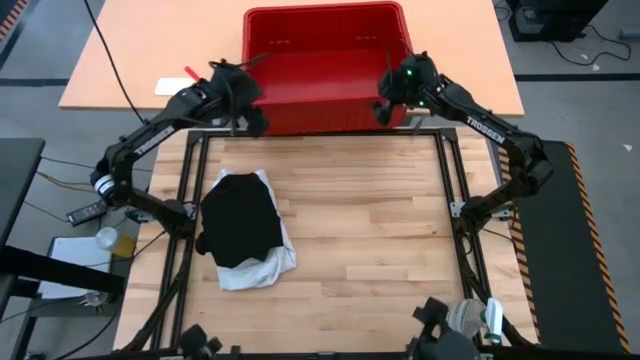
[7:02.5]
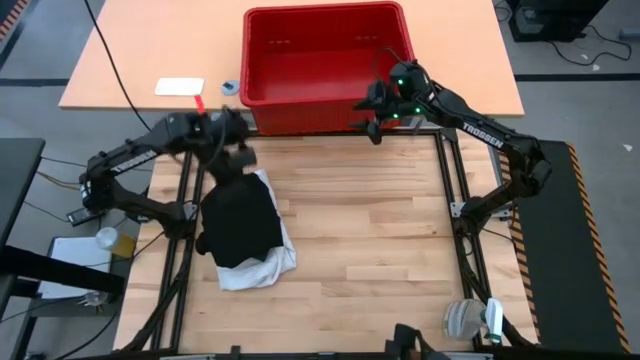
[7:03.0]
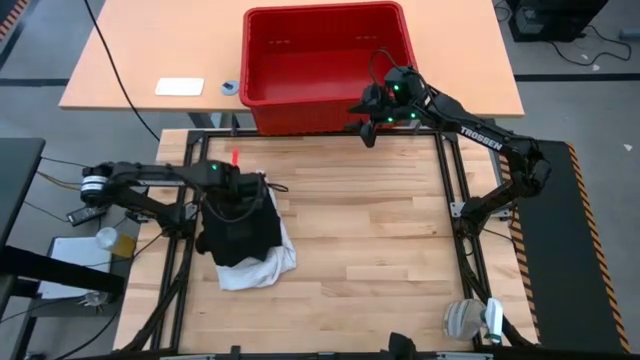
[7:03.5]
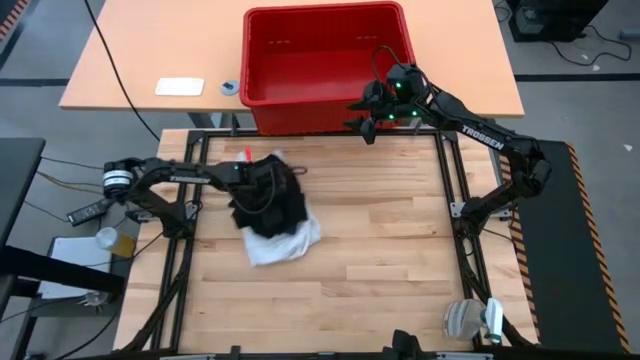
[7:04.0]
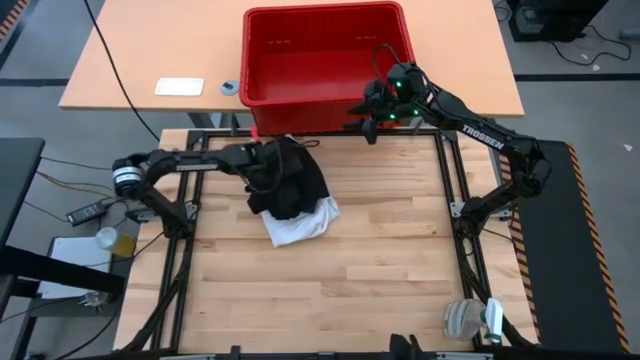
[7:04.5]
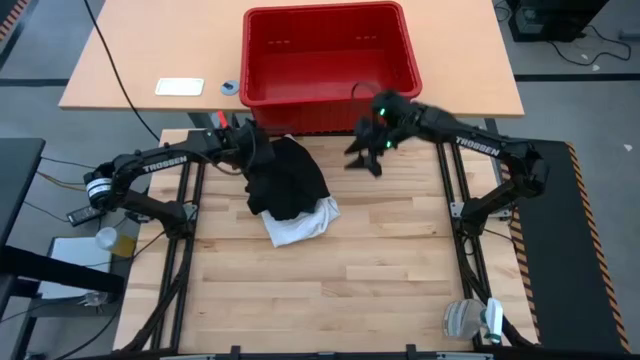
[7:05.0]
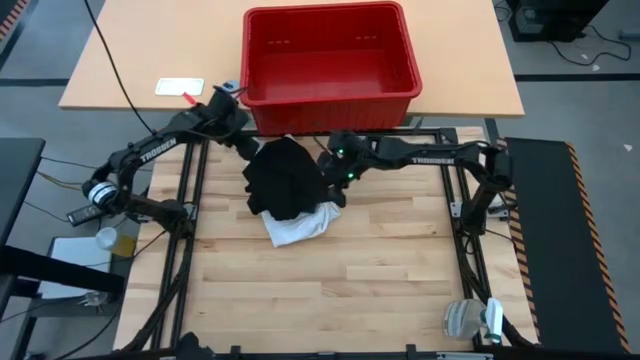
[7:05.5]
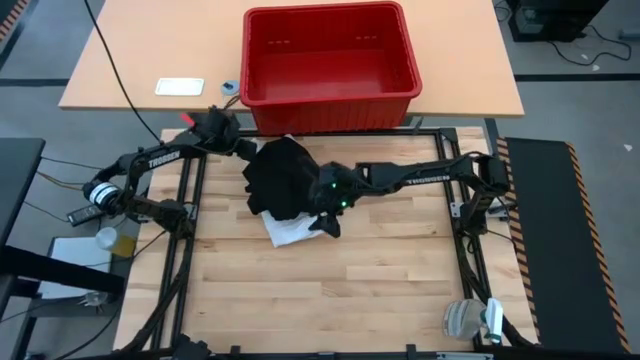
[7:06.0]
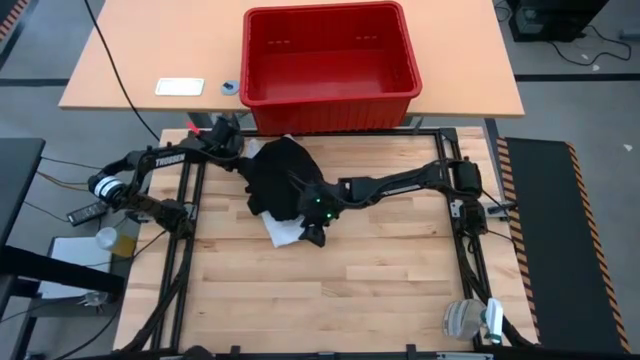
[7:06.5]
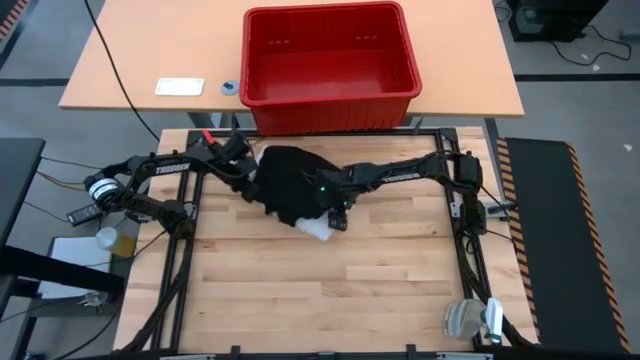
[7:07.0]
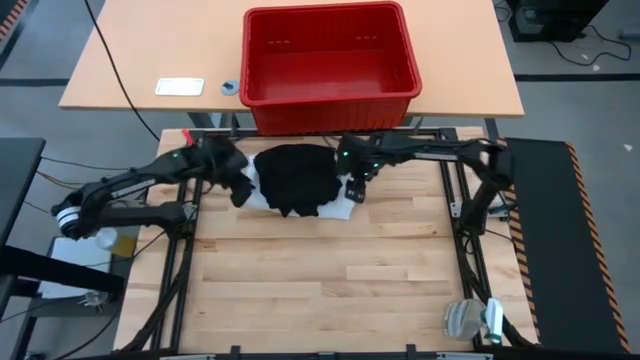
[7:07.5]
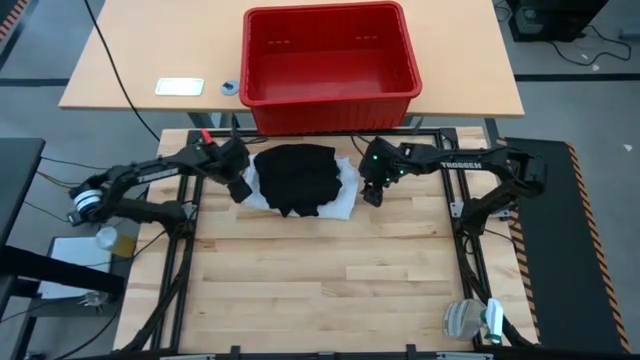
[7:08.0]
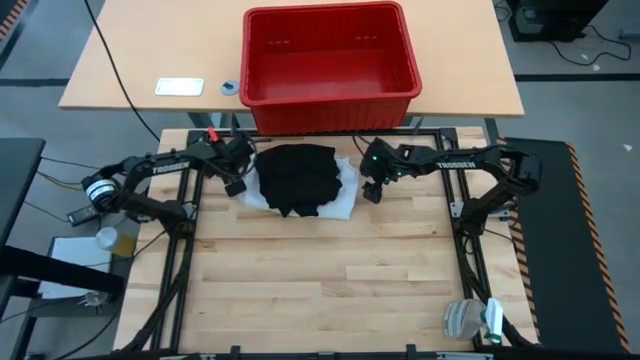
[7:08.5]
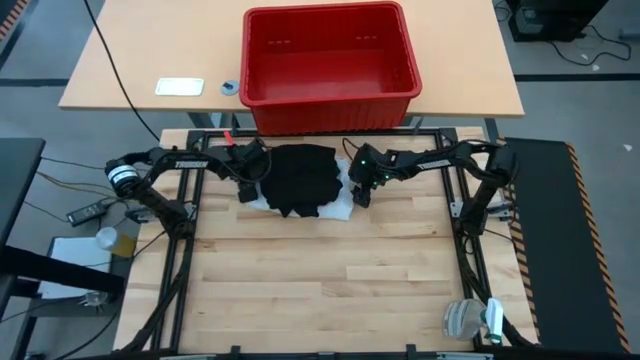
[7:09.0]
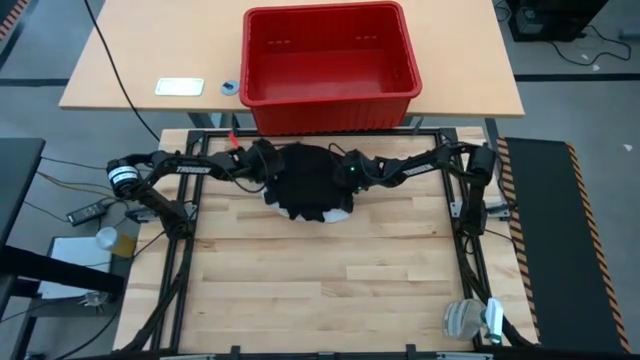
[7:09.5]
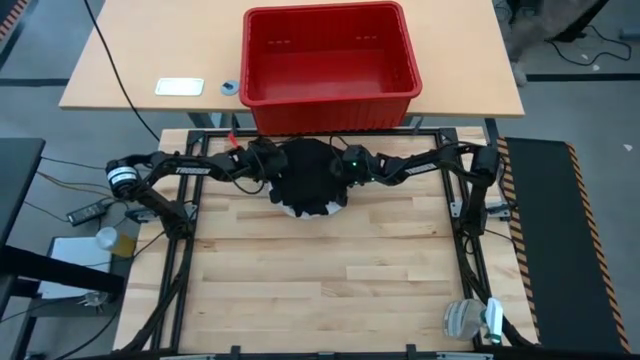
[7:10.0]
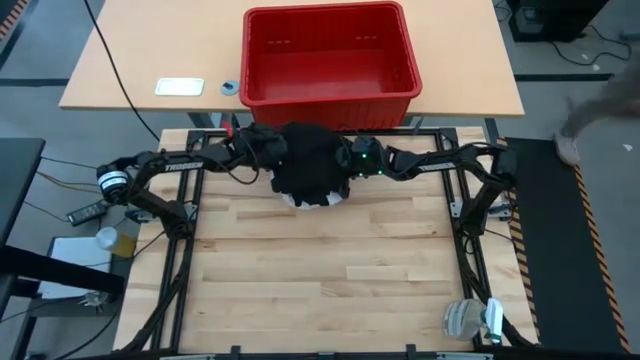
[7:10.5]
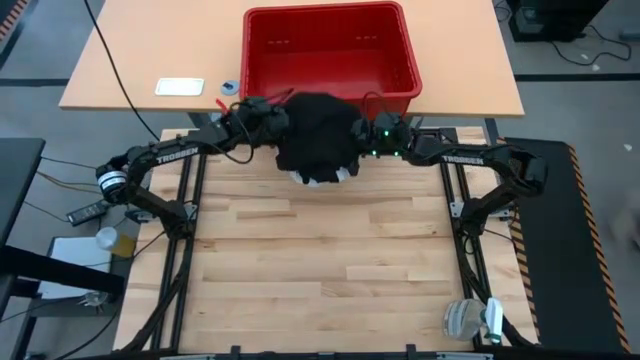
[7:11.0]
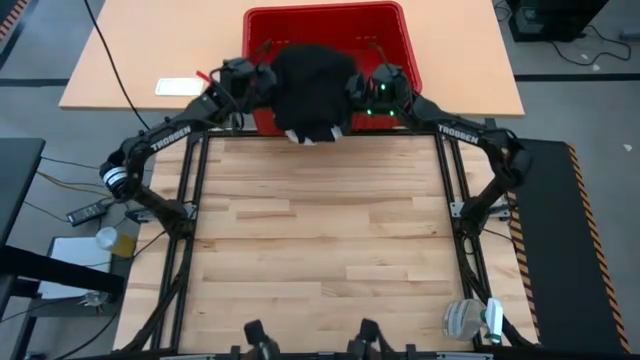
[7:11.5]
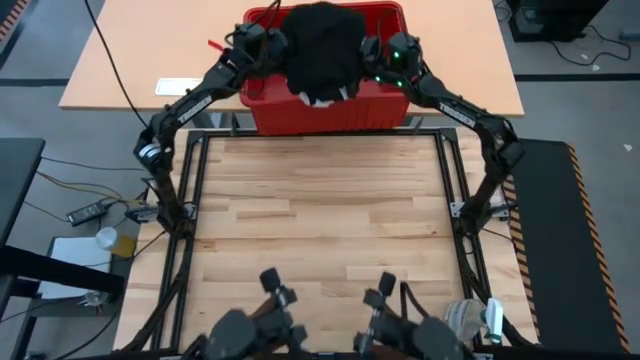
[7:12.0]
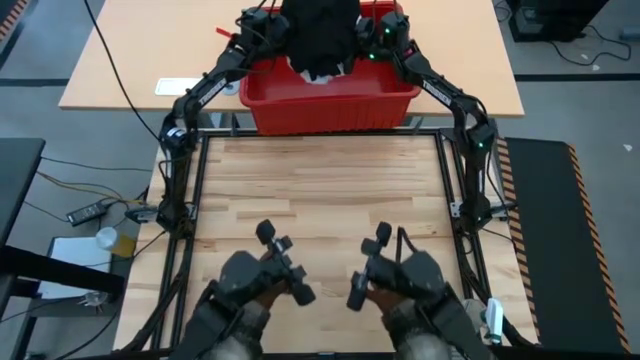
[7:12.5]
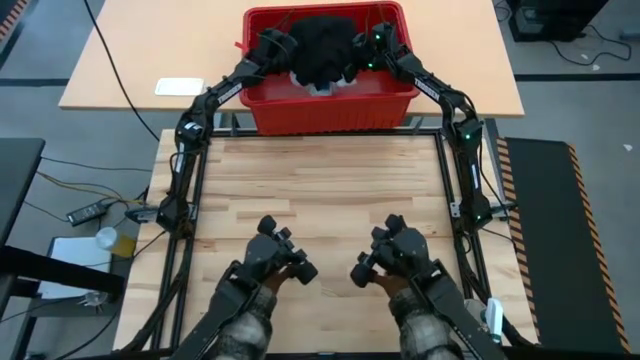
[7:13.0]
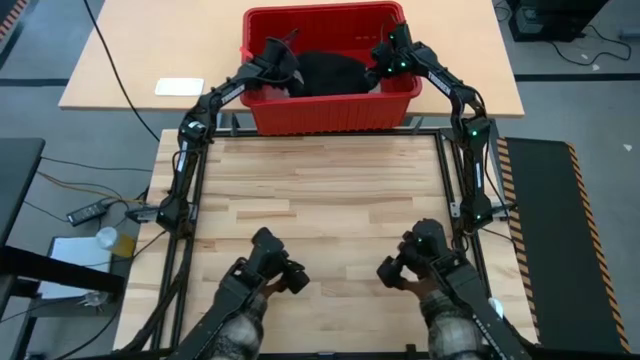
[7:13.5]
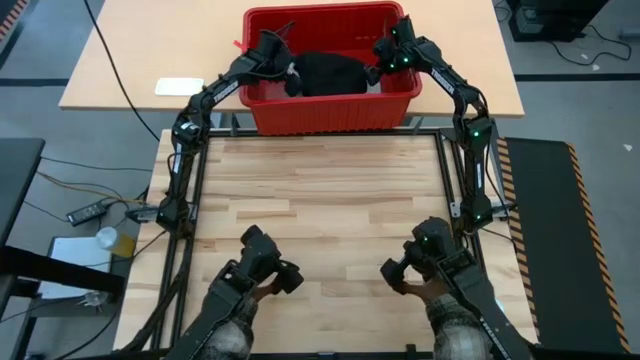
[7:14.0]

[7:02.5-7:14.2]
Task: Fold laundry
Put the stacked folded clothes into the red bin

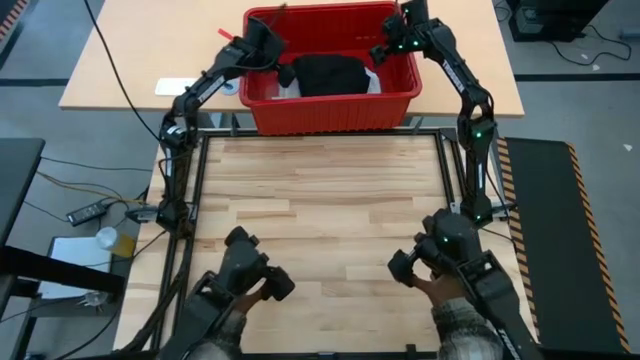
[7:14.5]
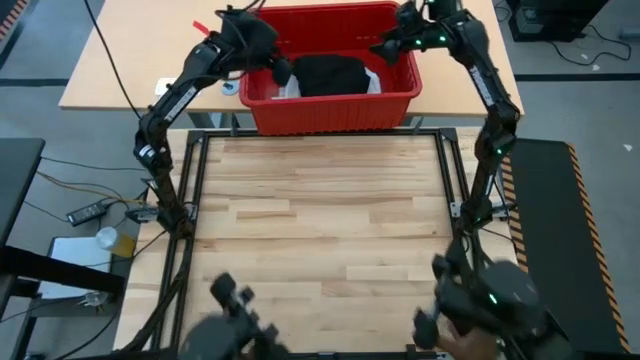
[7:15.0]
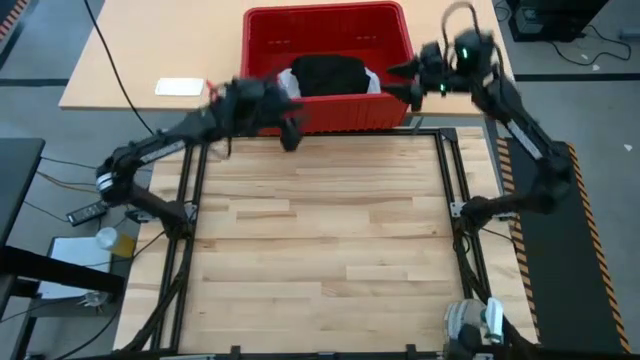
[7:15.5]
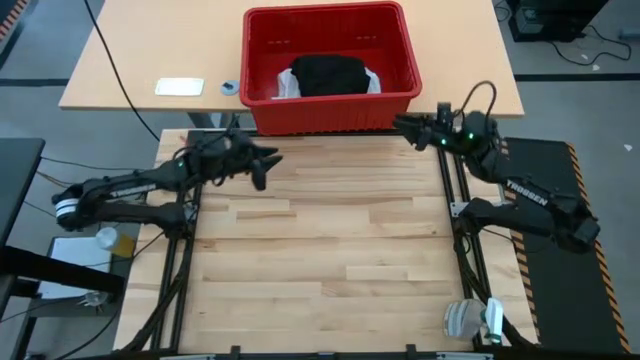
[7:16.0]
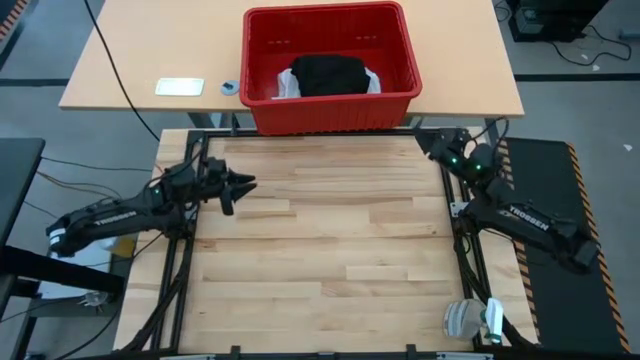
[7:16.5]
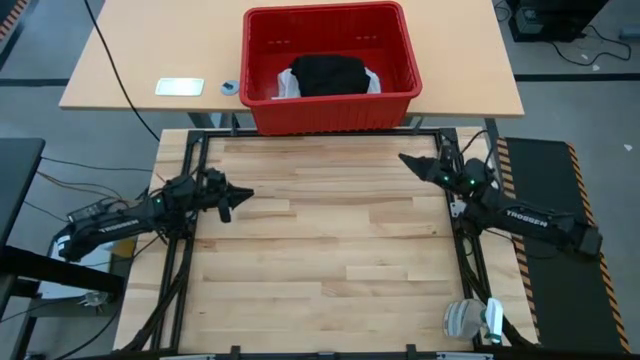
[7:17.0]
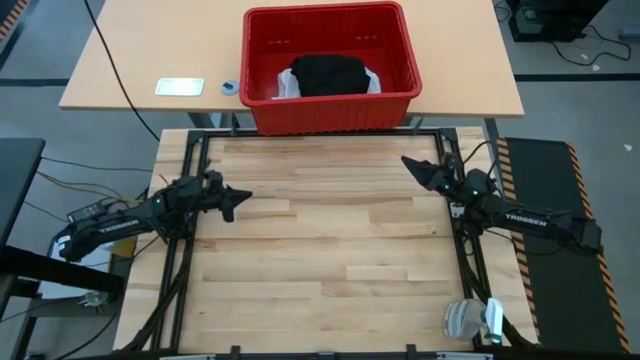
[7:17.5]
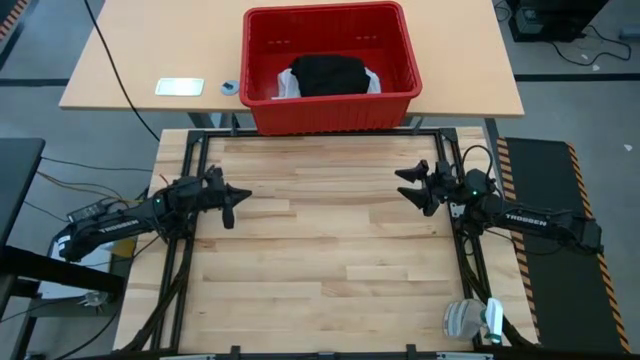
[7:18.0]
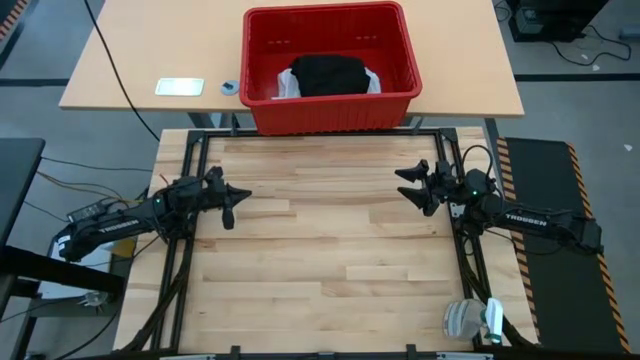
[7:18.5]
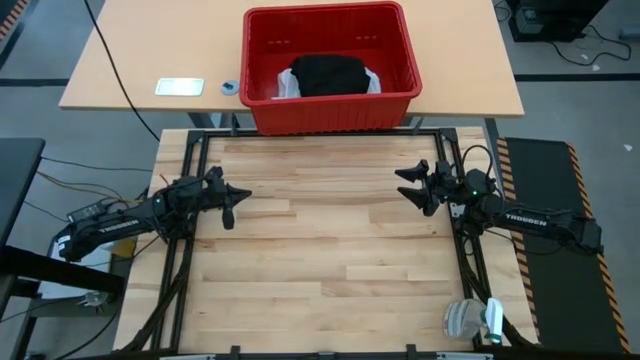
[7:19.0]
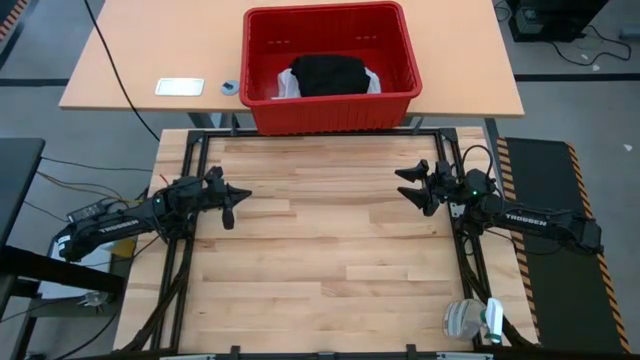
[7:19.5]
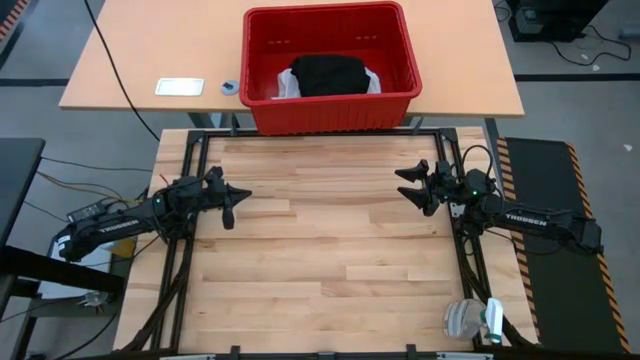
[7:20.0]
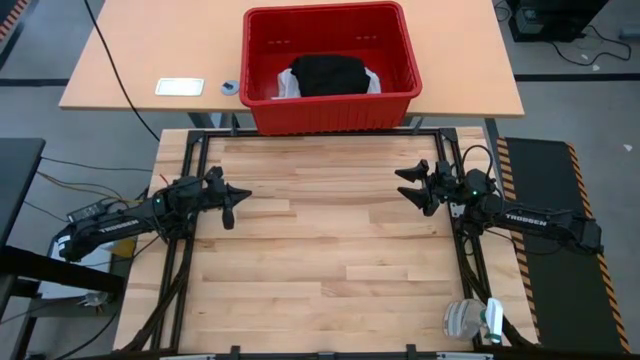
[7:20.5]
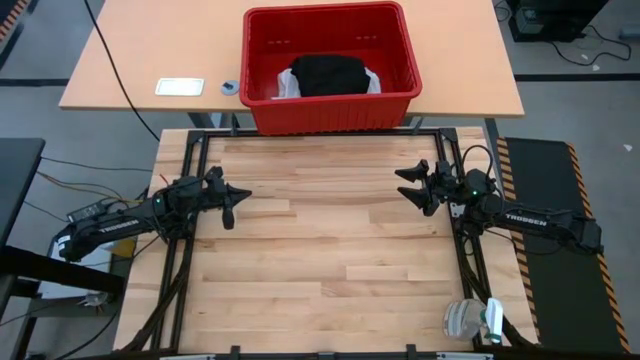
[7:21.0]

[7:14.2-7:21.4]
Return to Home Position

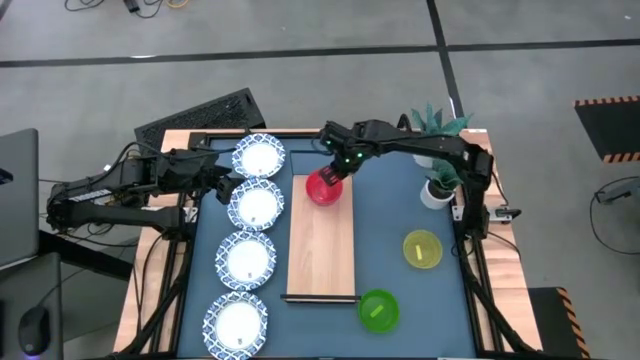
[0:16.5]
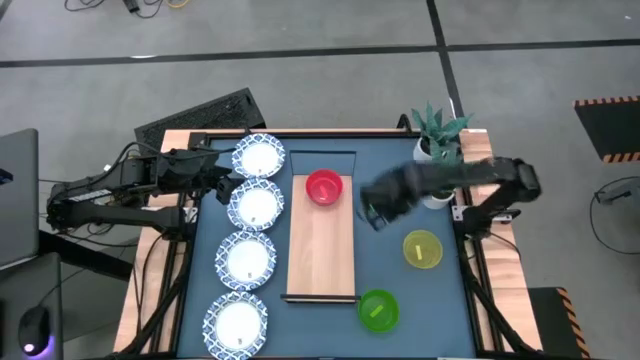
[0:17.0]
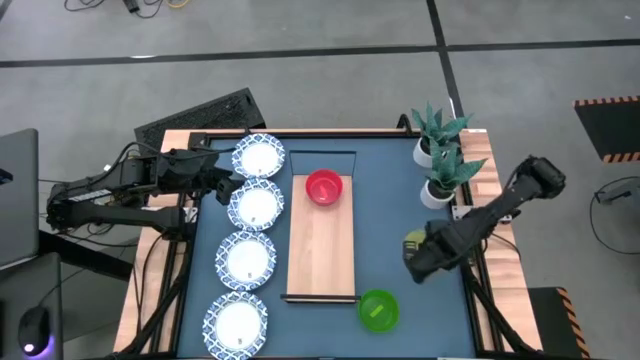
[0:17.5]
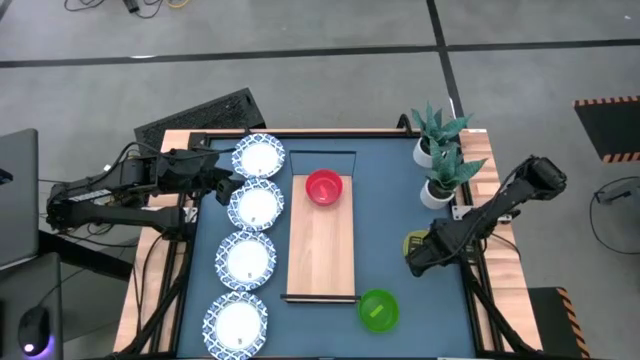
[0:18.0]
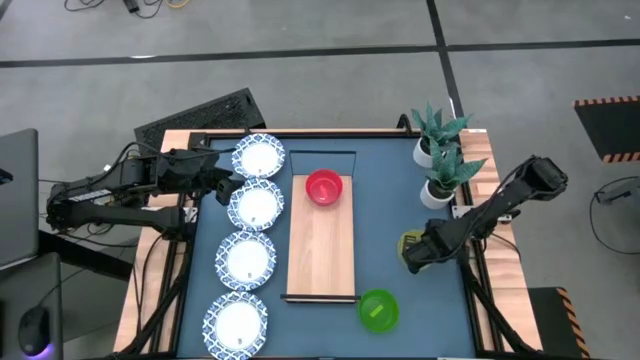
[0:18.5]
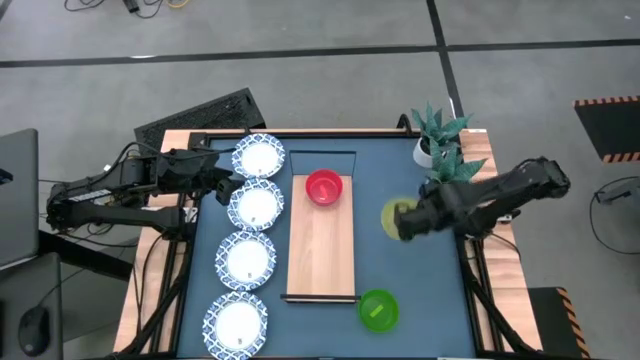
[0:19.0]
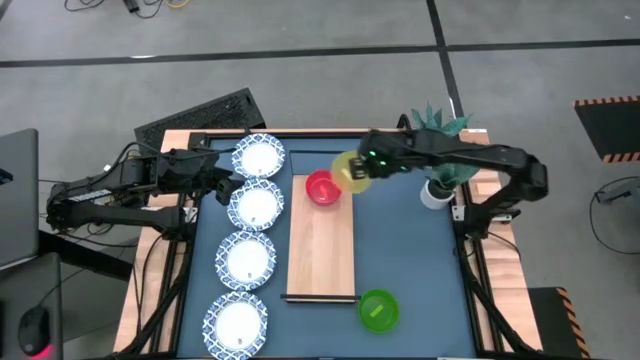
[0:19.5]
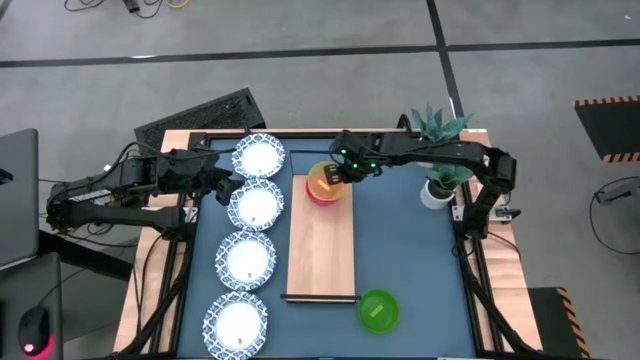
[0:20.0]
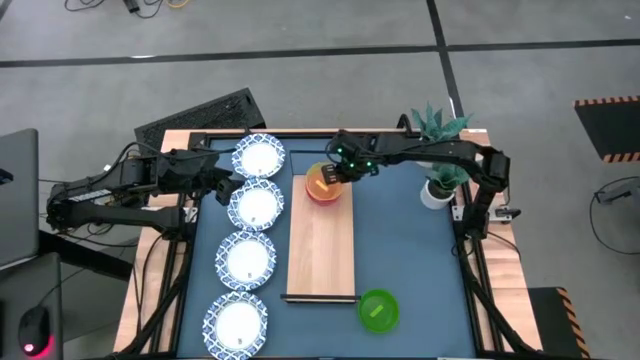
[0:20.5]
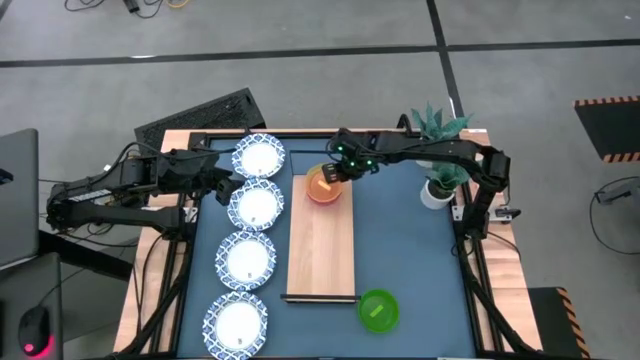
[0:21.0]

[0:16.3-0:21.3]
Task: Place and stack bowls onto a shelf
Stack the yellow bowl on top of the orange bowl on the shelf
